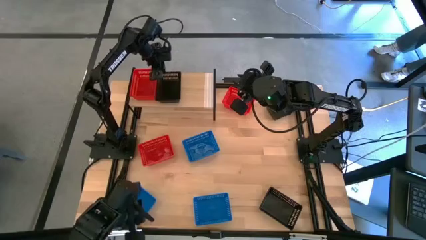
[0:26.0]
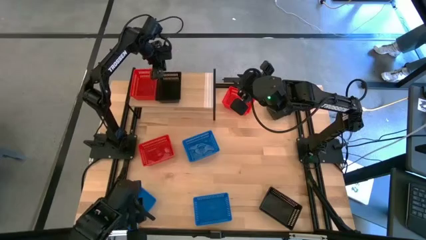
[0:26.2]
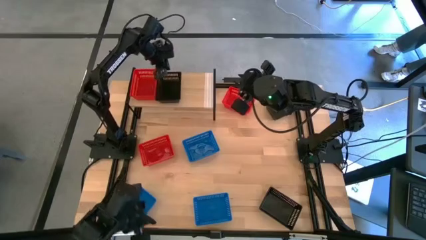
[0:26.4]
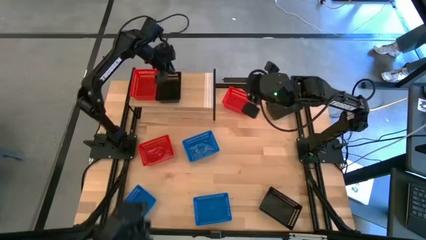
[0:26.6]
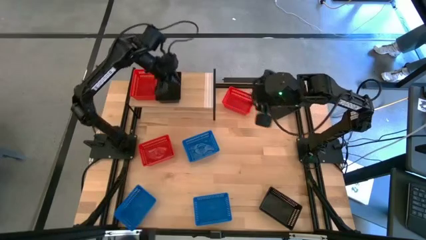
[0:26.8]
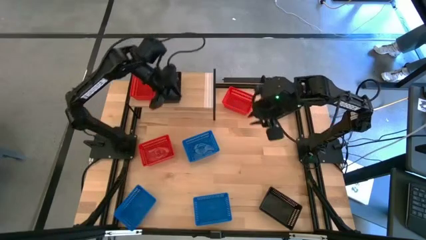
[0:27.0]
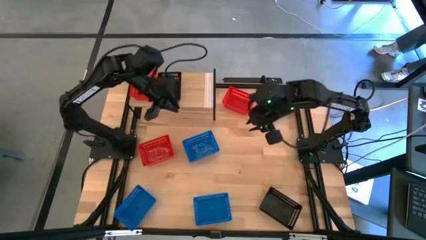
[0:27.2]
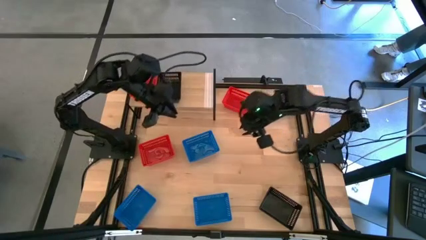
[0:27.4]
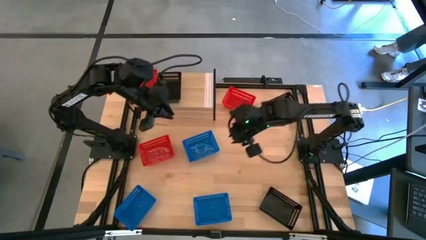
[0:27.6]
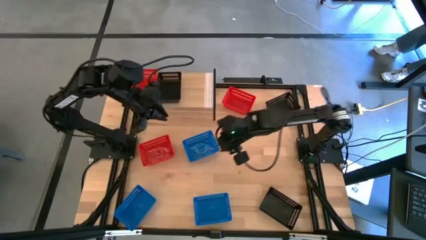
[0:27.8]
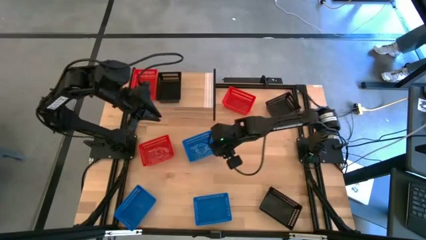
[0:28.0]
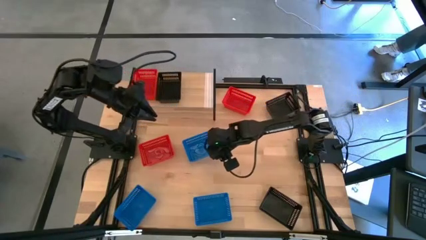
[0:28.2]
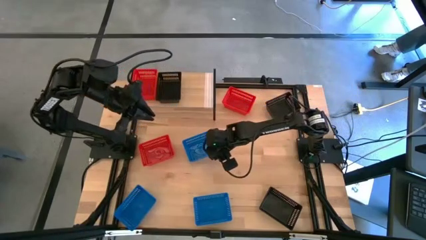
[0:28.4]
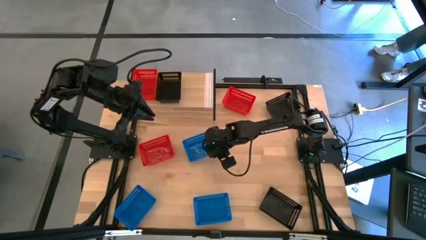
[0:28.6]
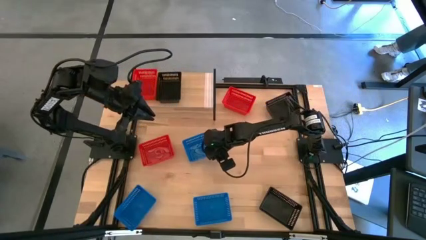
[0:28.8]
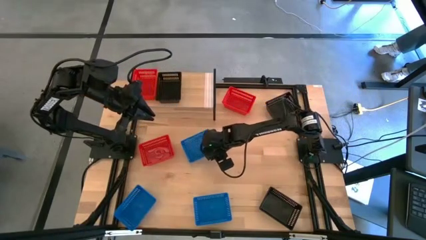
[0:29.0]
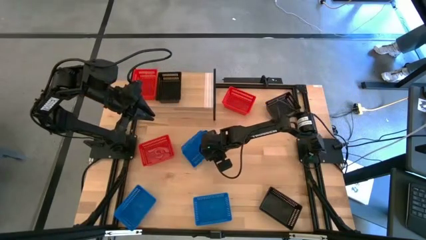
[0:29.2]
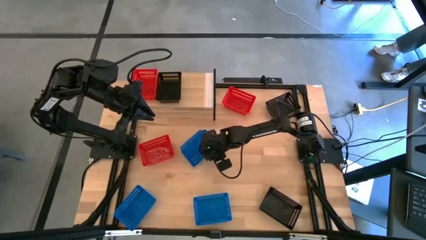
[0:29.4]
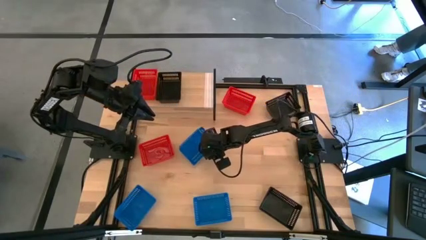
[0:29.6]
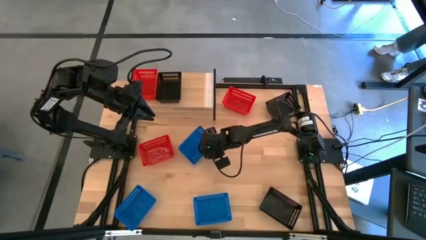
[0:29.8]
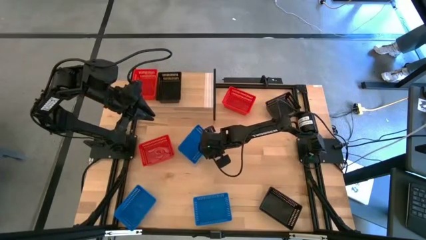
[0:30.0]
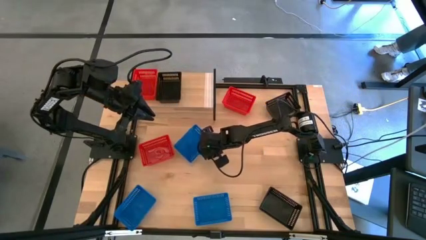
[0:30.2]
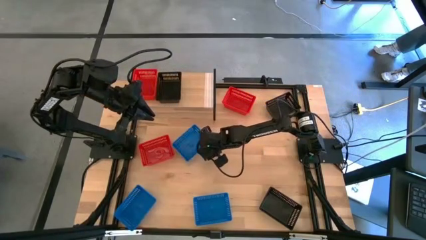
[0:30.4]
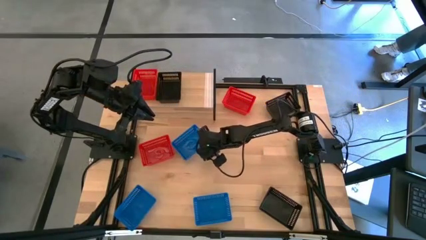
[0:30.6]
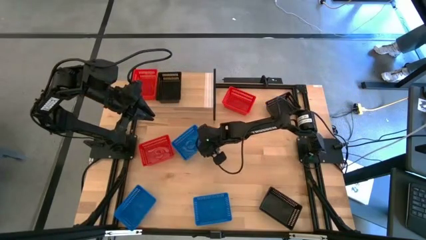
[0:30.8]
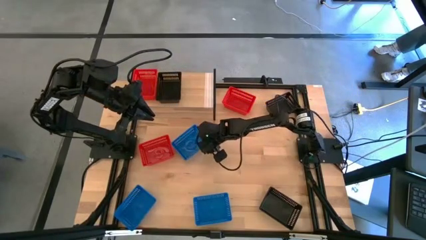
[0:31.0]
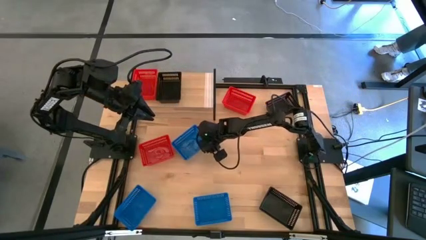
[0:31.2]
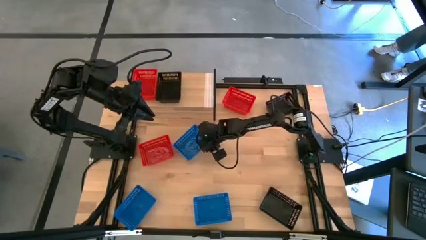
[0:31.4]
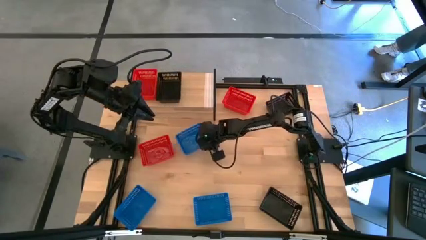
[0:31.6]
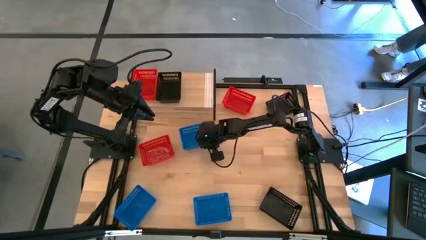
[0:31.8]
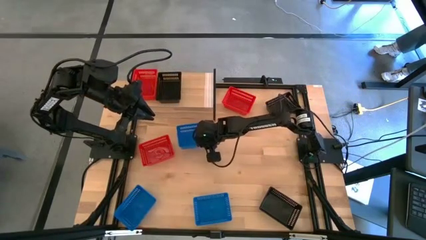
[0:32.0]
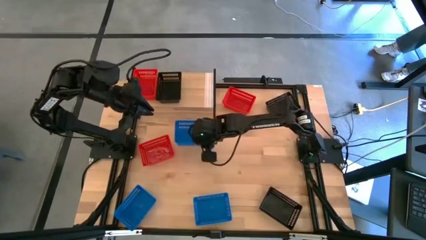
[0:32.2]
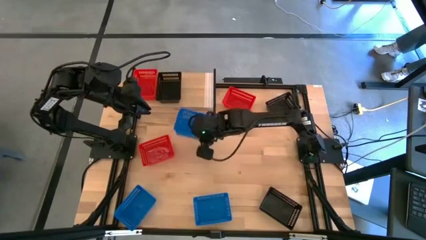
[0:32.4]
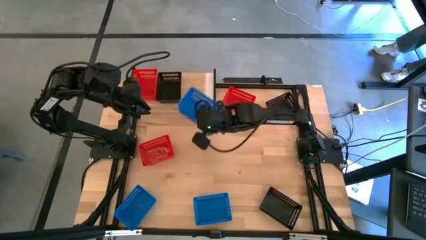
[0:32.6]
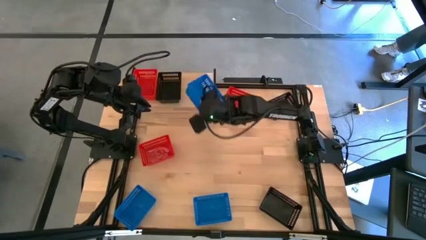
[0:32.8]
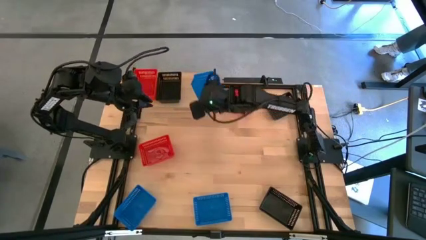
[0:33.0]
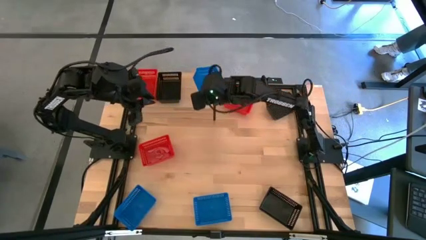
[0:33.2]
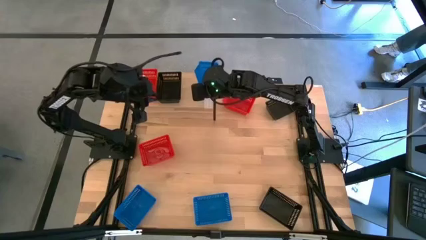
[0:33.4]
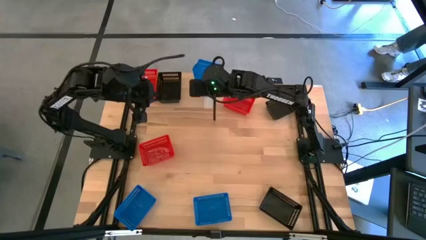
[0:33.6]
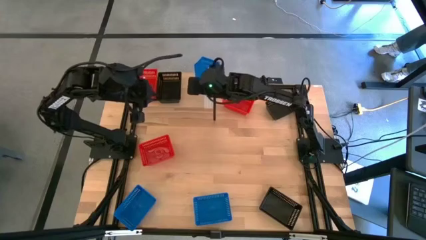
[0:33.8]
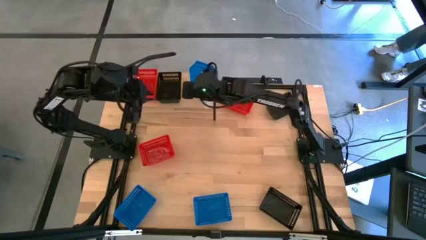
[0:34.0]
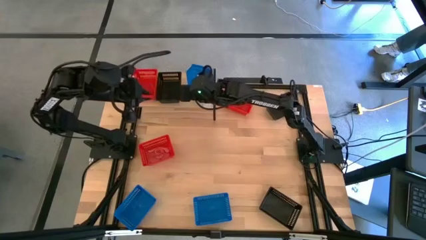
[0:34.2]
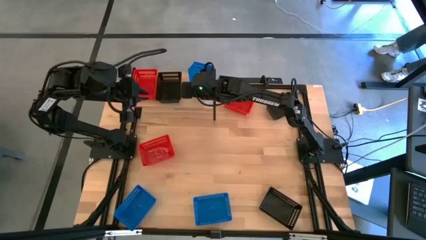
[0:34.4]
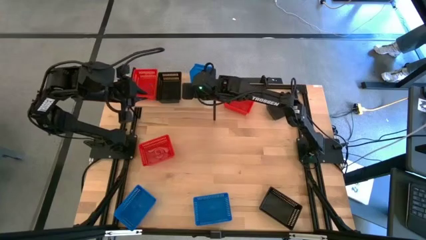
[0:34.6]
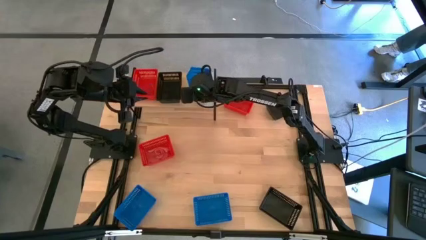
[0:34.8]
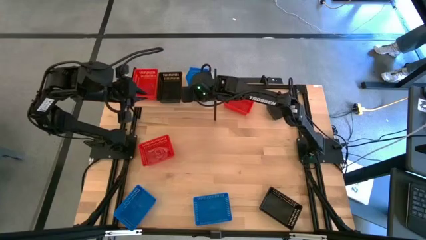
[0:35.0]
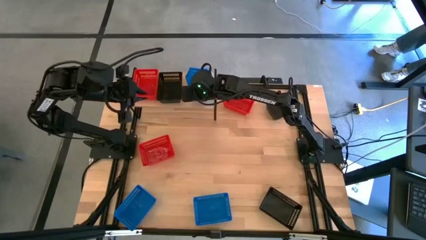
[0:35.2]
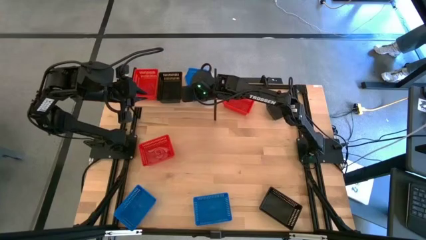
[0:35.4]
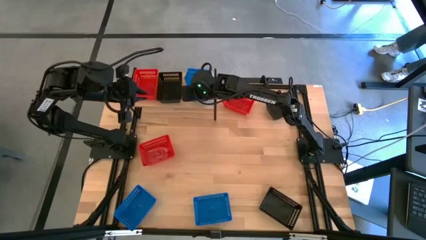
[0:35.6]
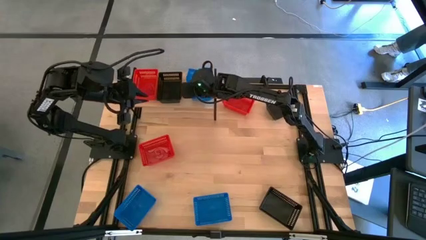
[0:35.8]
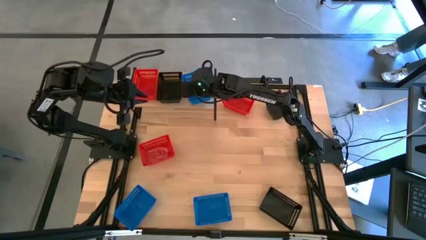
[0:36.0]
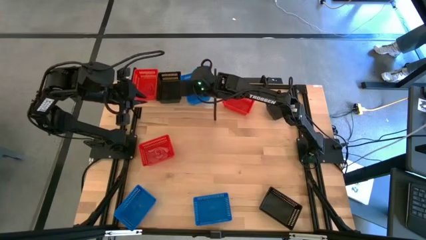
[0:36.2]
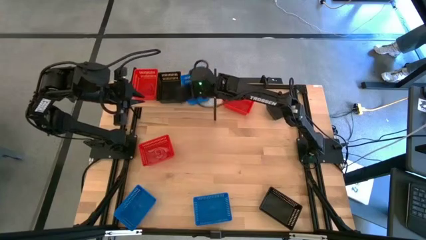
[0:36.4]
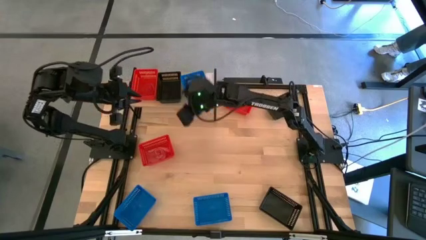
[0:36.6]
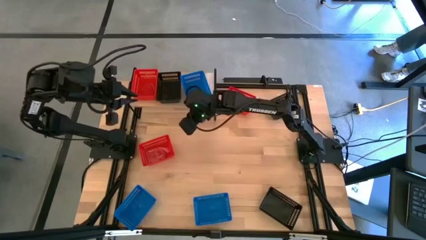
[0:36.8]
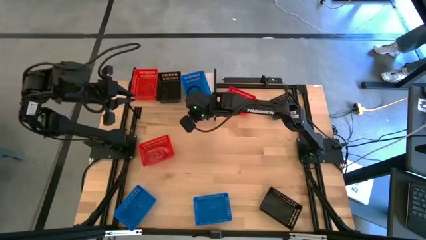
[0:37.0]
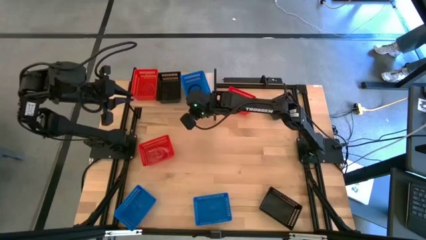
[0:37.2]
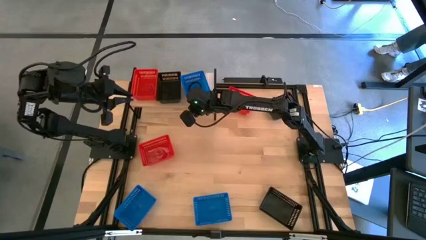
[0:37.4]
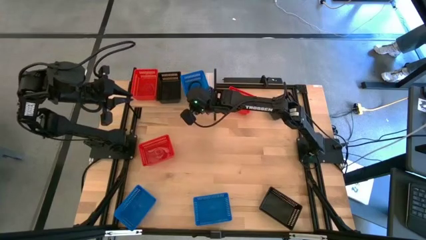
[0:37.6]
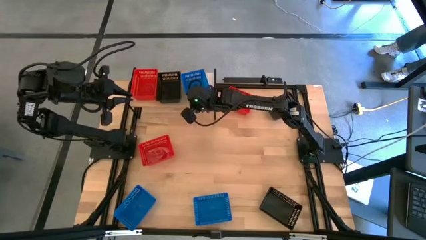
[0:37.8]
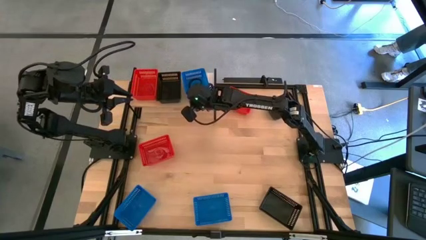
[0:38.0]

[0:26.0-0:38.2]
Task: Stack baskets on shelf by color
Put the top blue bin on the shelf
